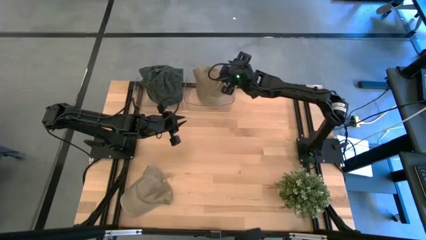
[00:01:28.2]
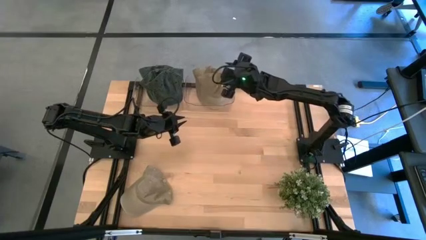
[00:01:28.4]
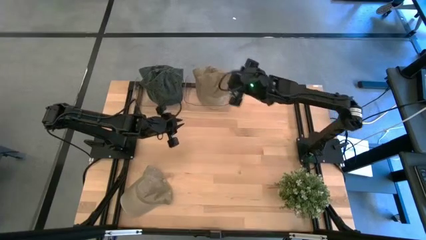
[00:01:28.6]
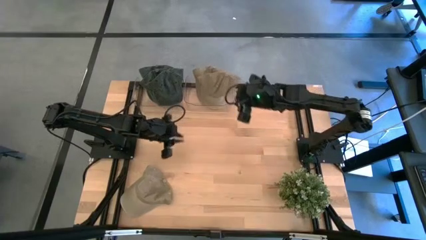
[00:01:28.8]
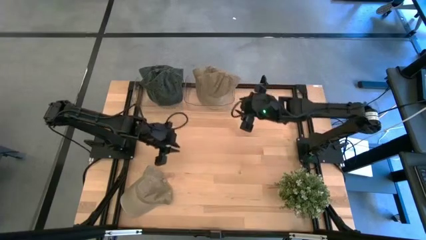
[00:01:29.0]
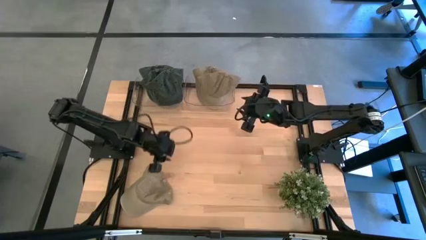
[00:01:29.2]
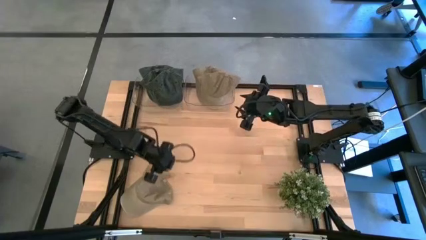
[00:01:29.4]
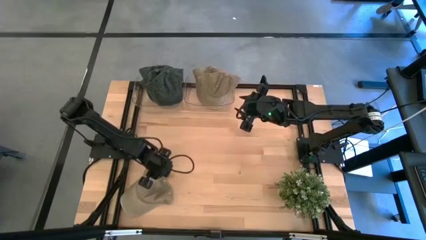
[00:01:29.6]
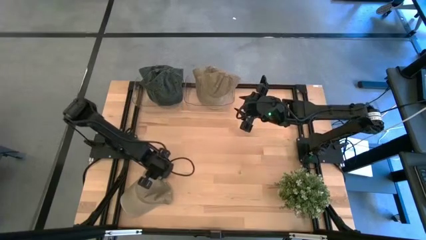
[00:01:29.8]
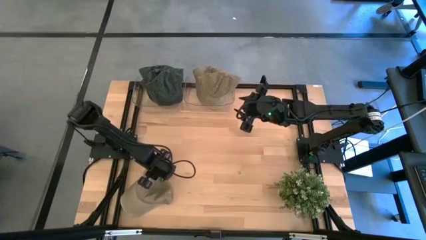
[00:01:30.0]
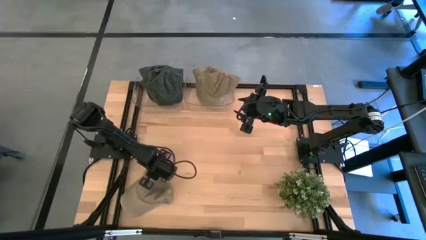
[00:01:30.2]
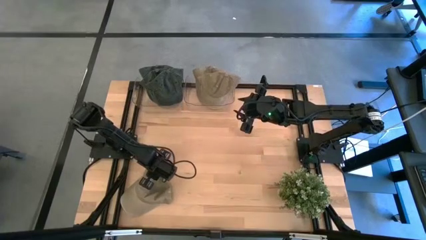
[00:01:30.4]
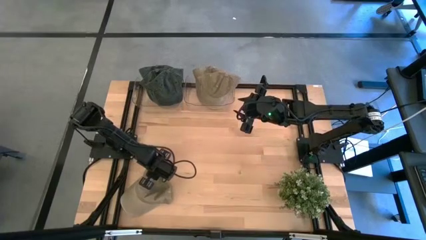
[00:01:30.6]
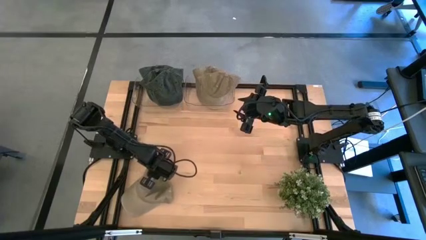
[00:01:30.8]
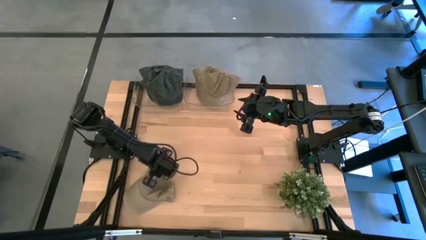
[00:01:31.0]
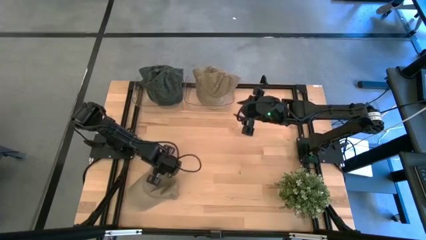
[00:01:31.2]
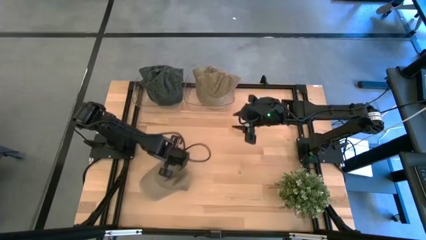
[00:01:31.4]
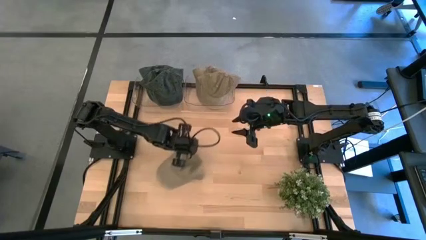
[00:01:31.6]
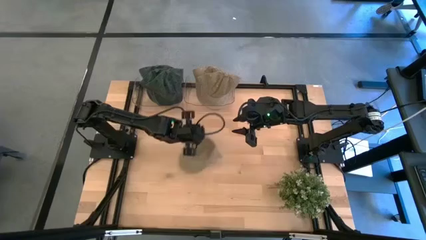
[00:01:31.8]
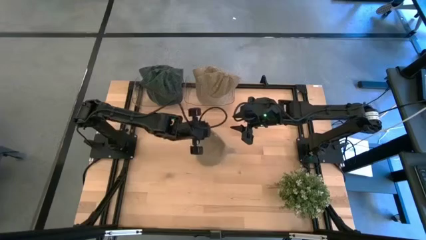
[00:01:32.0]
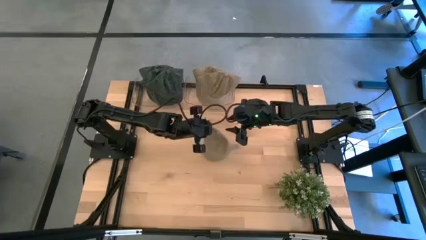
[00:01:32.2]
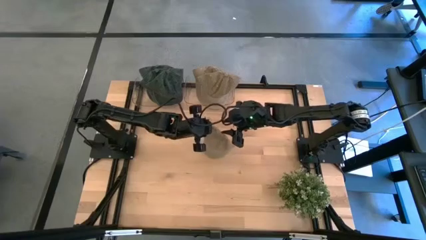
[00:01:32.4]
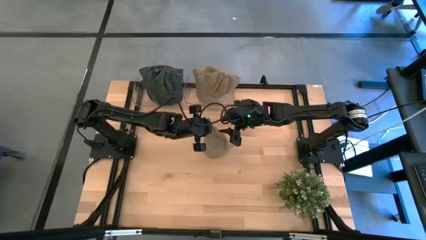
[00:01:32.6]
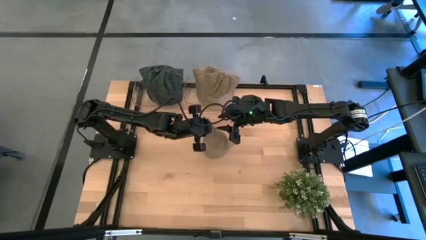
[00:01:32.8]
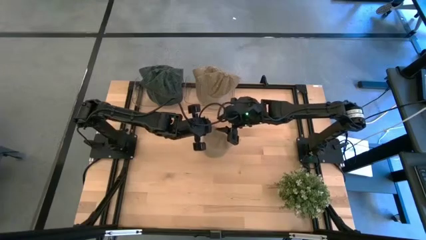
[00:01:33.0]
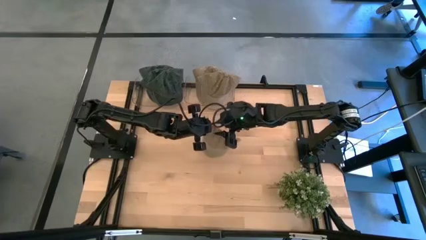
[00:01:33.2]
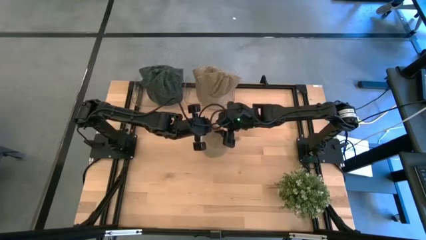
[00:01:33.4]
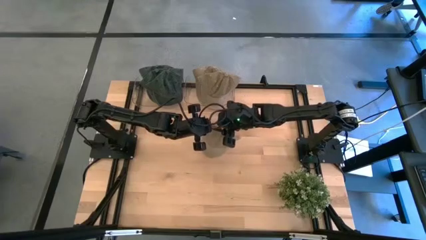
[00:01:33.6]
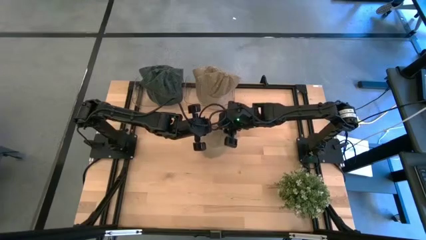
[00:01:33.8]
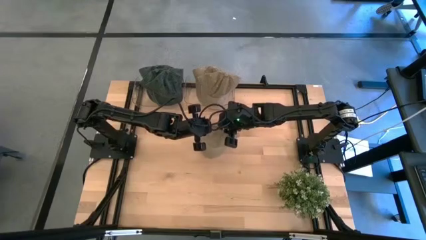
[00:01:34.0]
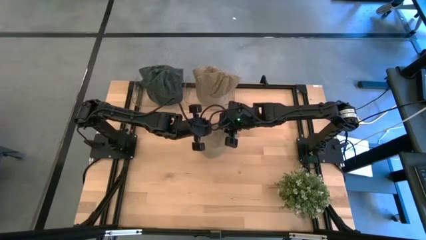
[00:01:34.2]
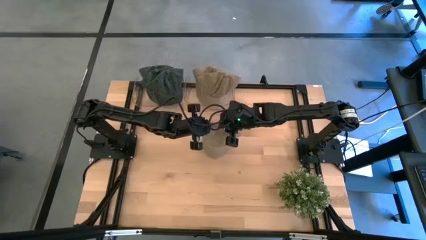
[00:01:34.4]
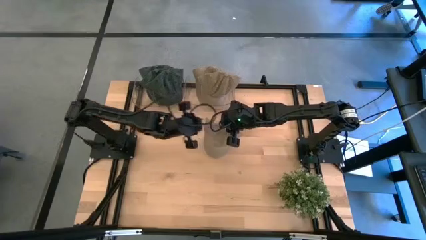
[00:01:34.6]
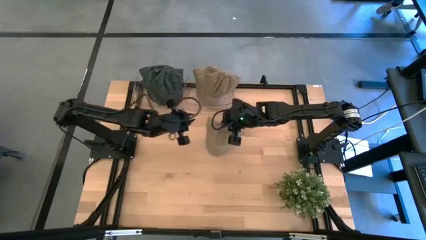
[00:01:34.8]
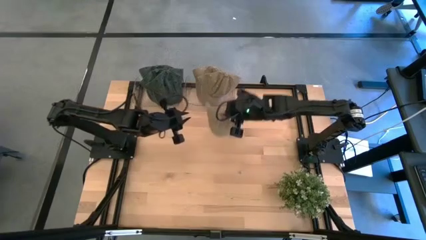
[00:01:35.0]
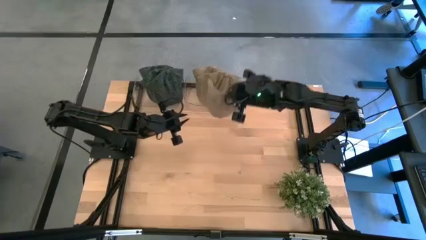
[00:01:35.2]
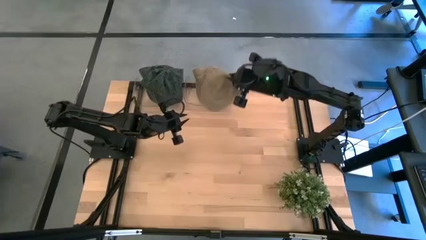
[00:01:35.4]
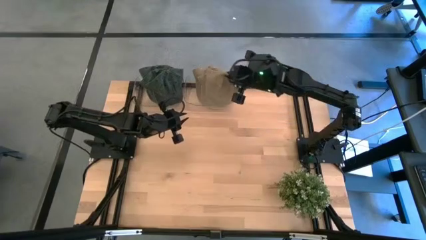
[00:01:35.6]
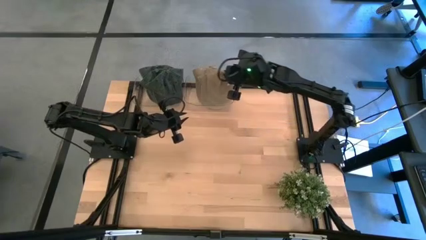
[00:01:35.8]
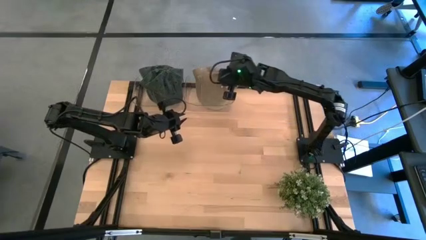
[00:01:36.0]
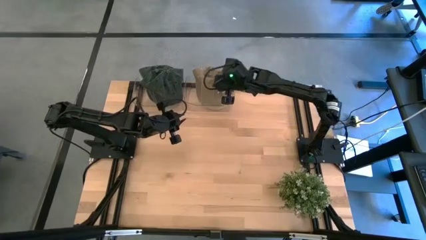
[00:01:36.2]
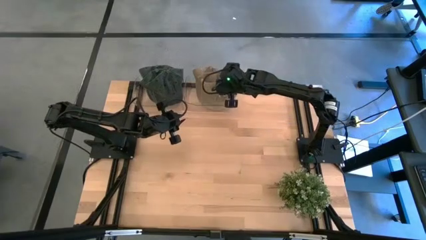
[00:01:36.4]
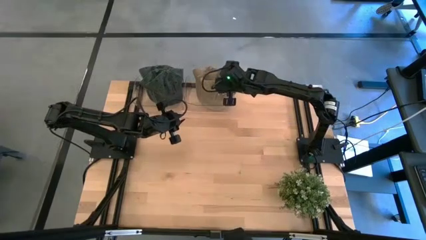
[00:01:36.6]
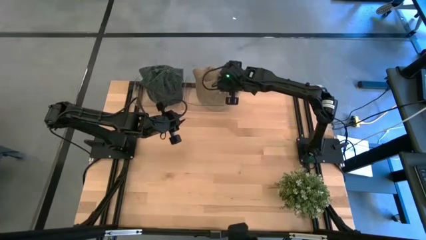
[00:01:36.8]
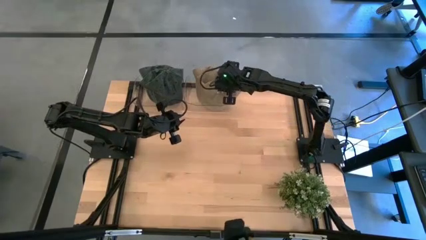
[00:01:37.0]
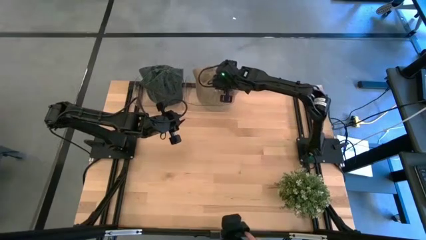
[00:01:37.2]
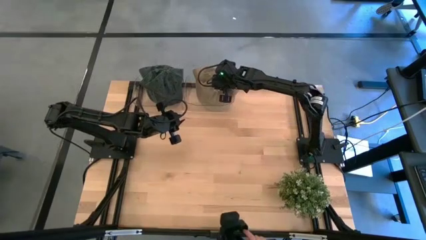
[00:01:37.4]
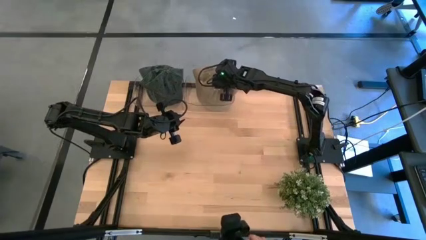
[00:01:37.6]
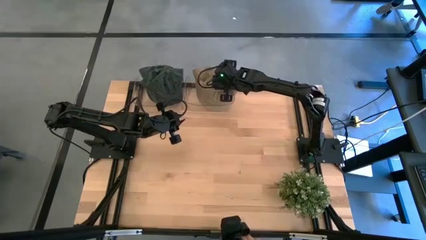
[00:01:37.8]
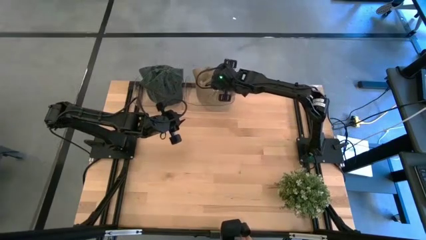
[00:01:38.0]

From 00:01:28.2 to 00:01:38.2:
Task: Pick & Place hat
Put the brown cap into the left transparent bin

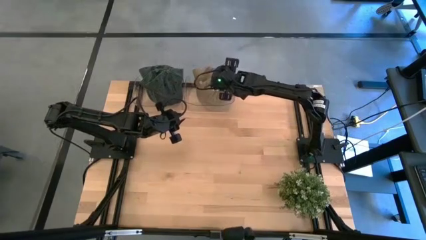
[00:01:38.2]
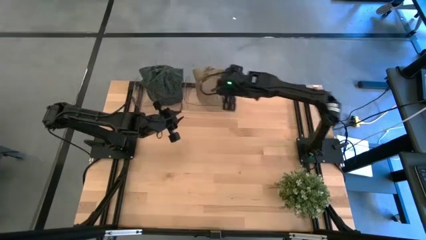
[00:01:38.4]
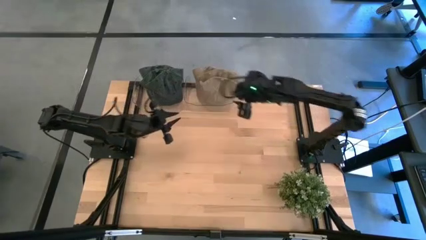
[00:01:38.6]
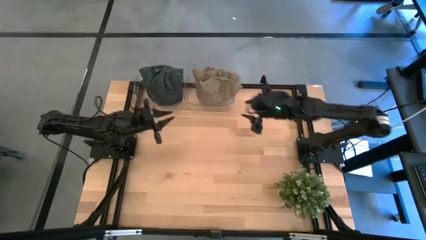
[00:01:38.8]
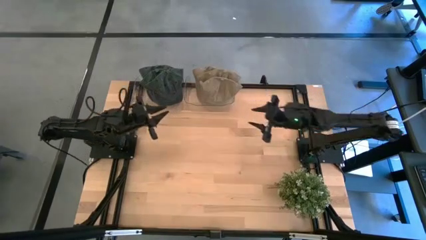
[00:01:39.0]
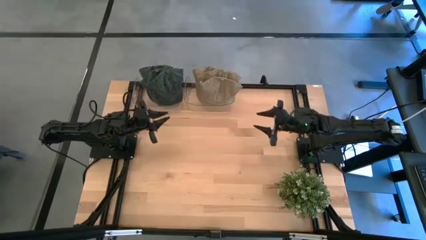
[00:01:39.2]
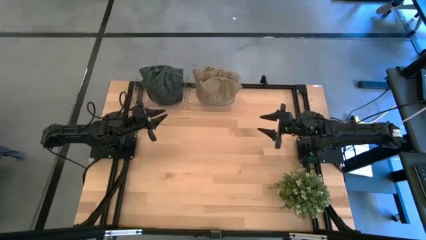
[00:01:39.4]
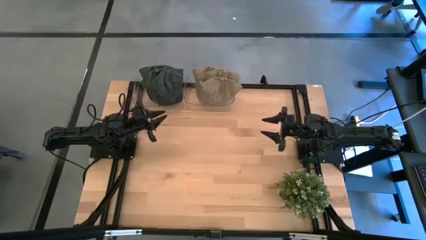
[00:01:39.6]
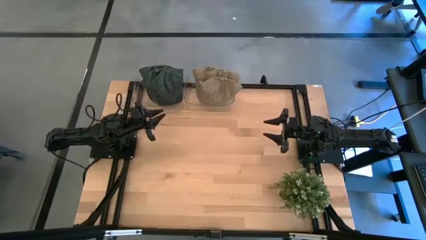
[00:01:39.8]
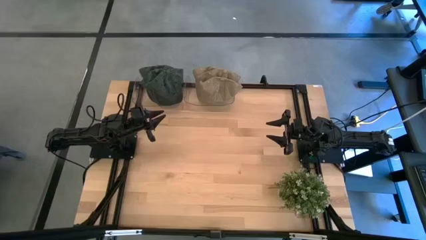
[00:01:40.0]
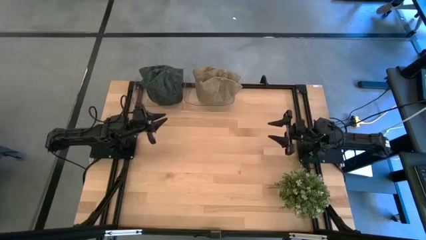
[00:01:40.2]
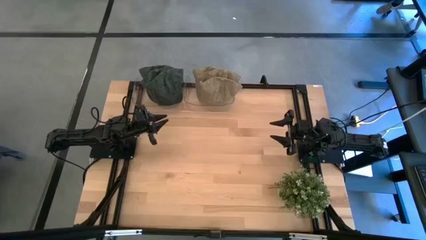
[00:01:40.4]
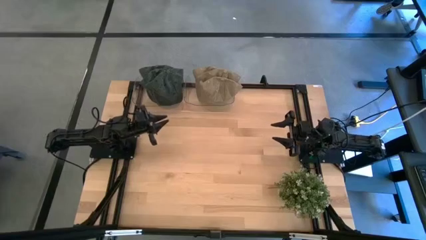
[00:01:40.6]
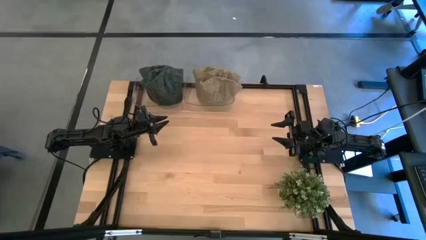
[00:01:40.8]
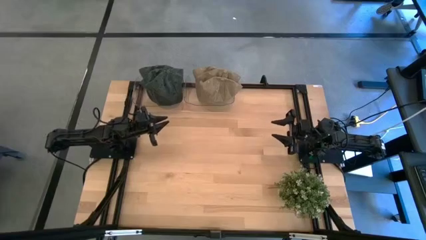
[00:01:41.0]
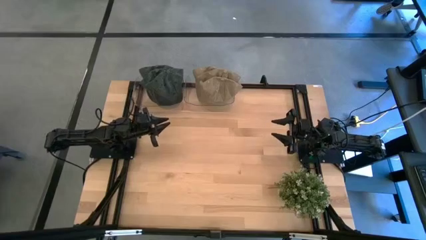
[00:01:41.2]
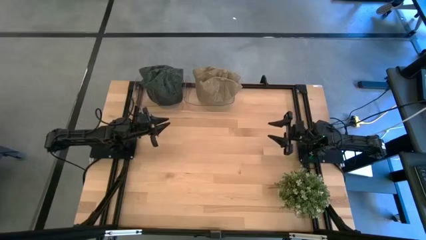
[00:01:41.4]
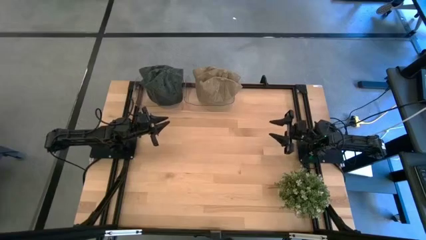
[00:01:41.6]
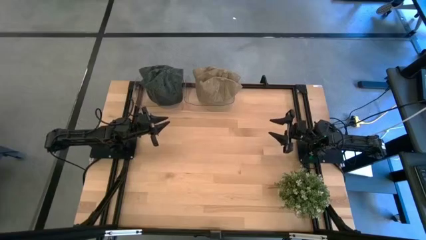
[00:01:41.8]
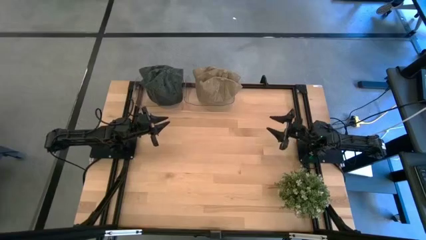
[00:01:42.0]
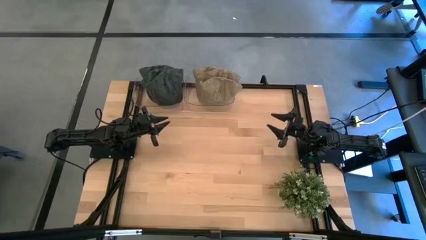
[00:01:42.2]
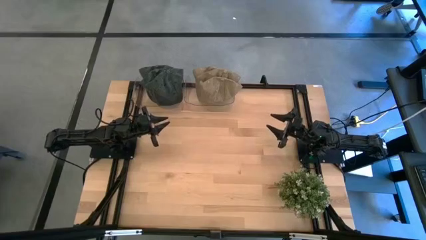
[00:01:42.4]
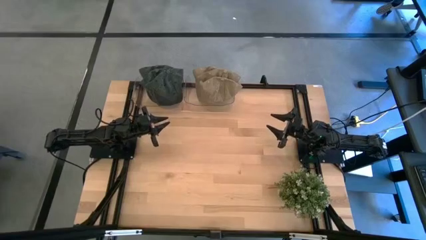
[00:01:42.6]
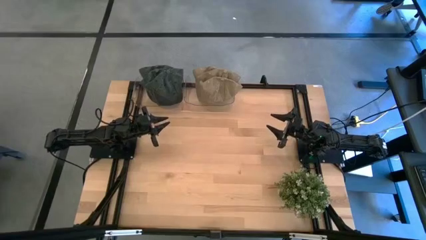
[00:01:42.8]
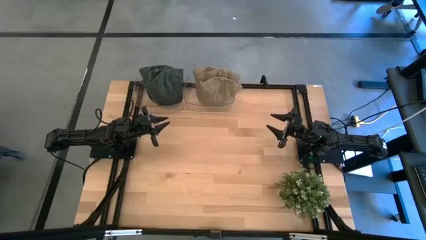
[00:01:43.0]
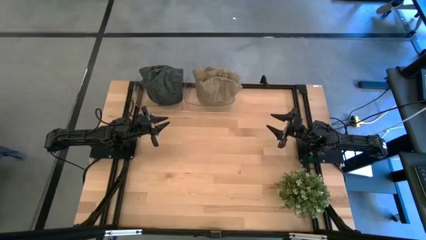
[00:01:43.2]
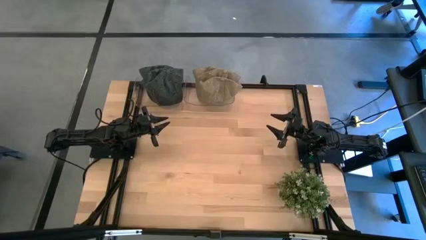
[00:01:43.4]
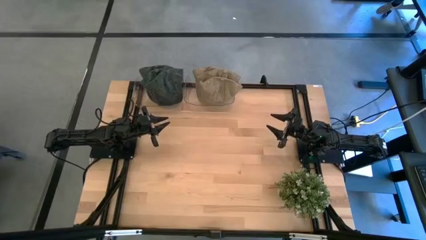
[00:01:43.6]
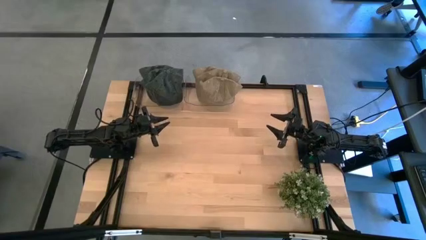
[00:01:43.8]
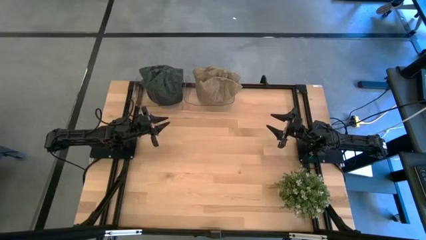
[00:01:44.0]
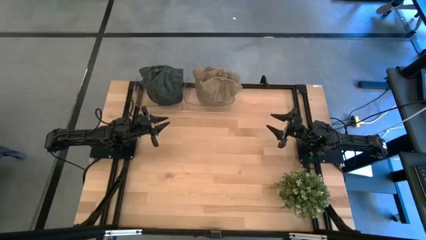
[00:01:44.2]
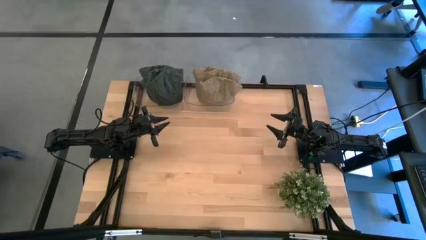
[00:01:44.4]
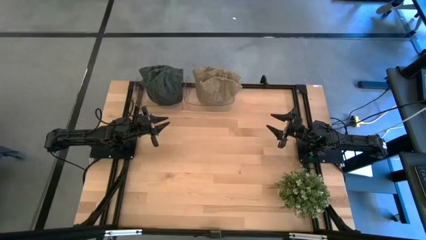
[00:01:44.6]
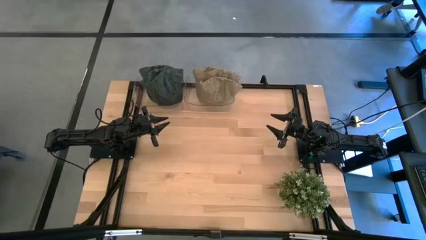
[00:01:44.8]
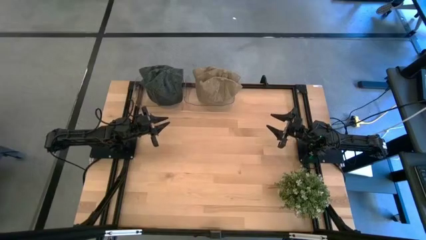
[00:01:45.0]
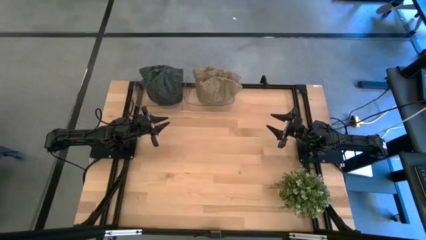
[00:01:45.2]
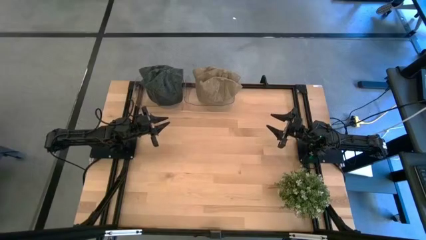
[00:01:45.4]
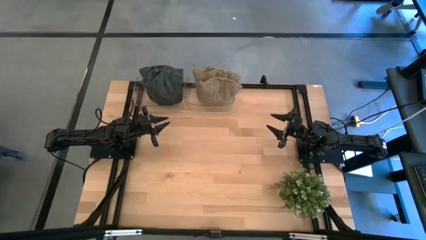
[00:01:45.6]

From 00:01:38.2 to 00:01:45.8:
Return to Home Position
